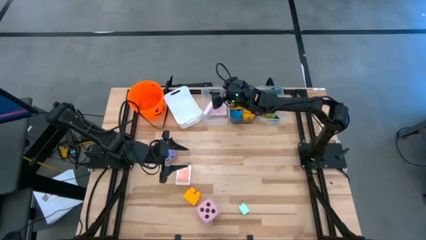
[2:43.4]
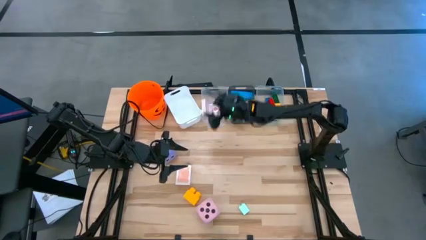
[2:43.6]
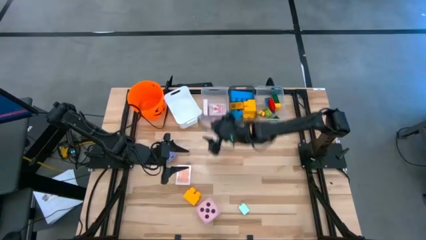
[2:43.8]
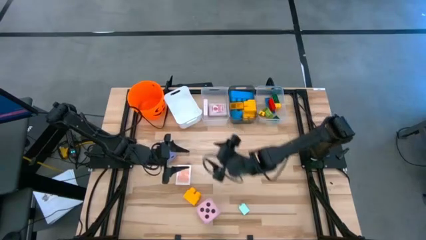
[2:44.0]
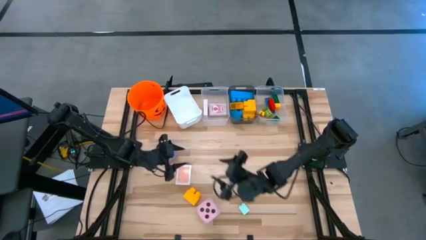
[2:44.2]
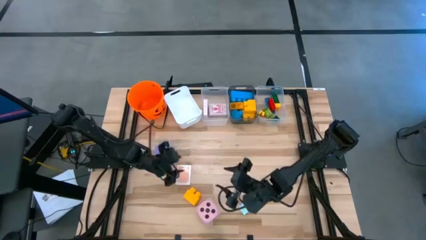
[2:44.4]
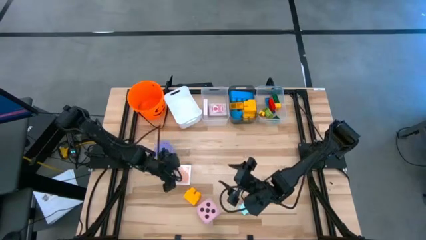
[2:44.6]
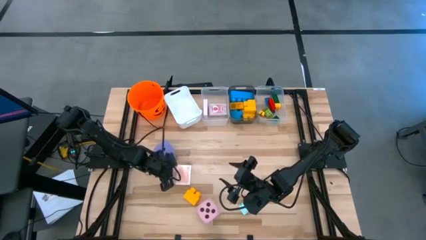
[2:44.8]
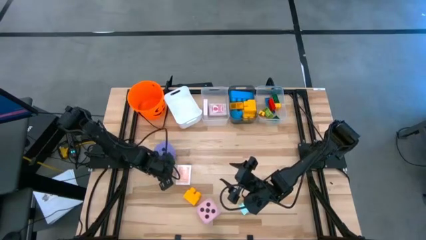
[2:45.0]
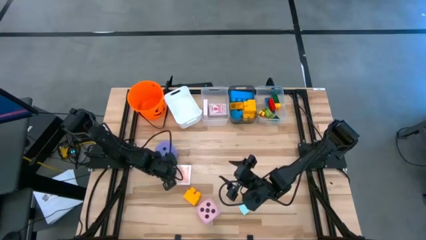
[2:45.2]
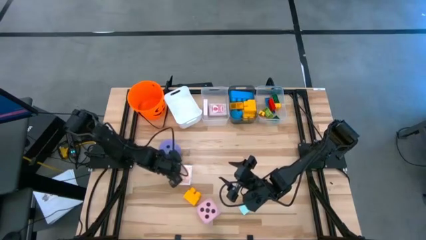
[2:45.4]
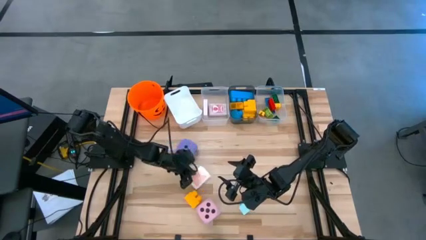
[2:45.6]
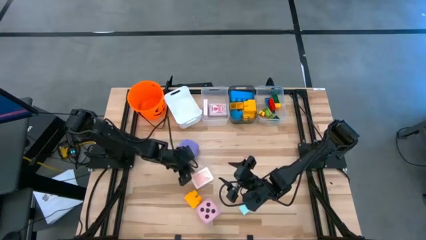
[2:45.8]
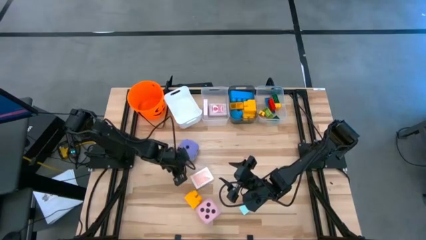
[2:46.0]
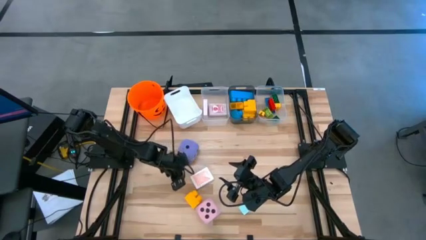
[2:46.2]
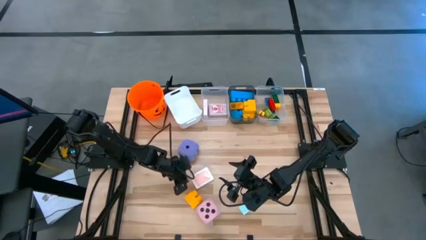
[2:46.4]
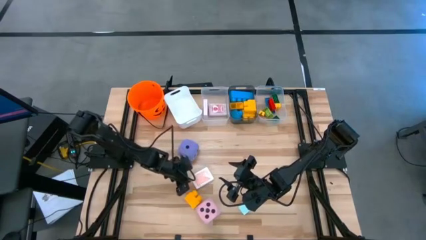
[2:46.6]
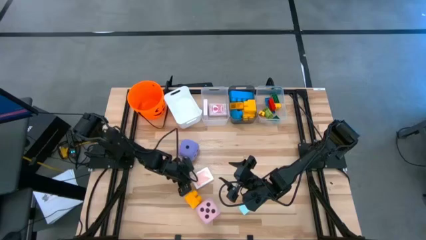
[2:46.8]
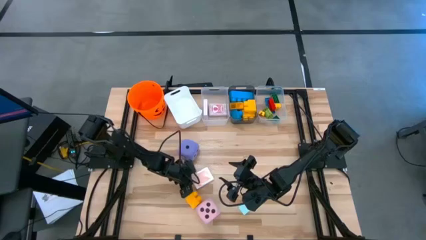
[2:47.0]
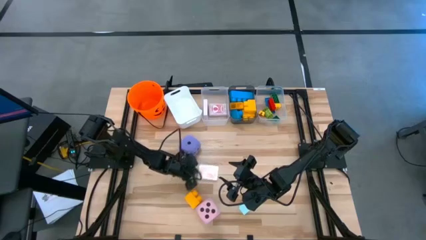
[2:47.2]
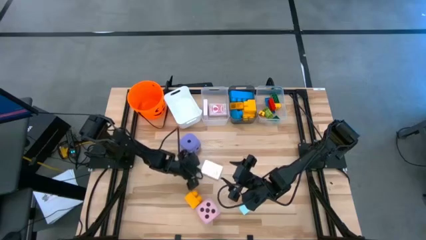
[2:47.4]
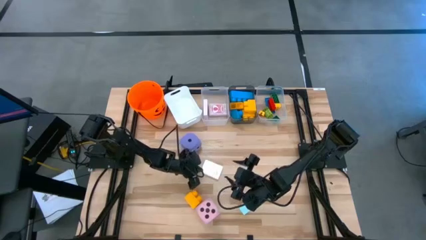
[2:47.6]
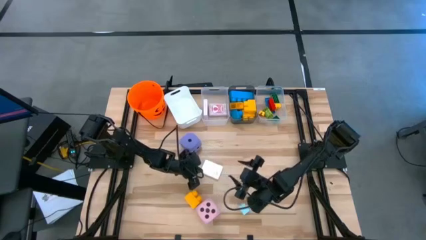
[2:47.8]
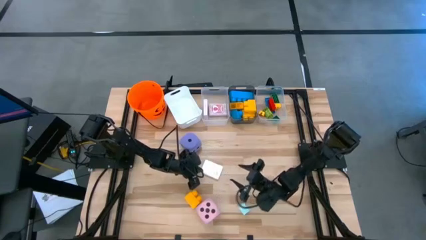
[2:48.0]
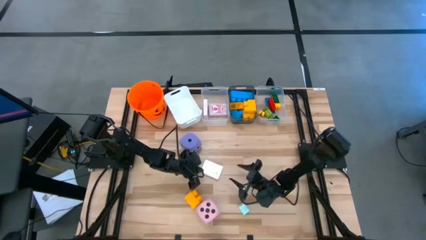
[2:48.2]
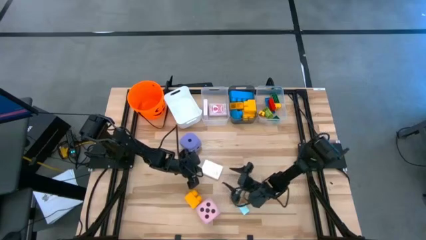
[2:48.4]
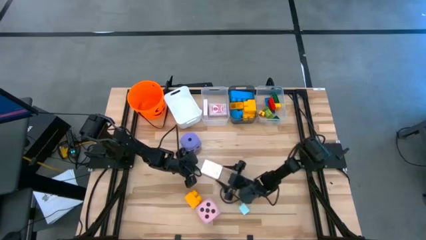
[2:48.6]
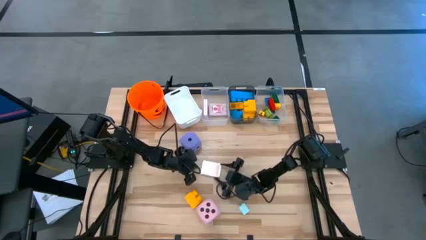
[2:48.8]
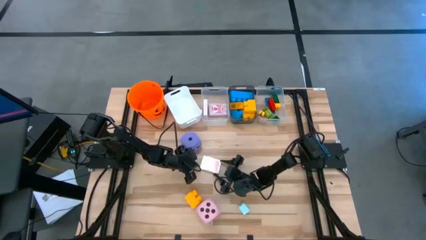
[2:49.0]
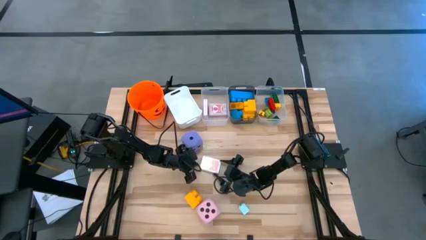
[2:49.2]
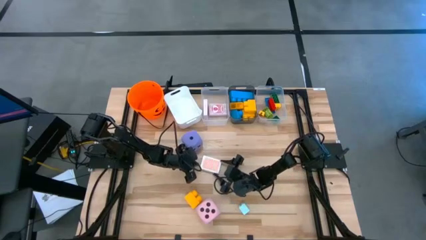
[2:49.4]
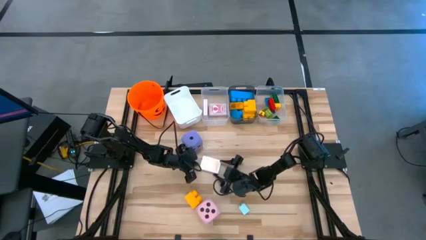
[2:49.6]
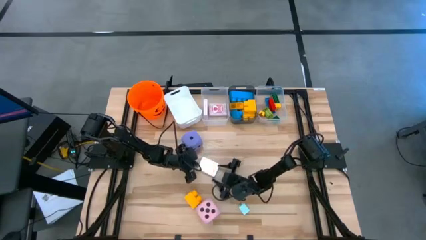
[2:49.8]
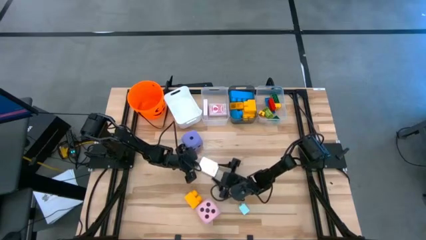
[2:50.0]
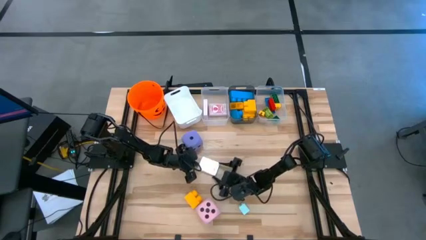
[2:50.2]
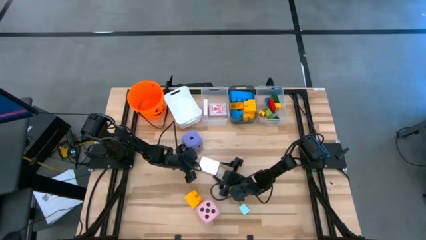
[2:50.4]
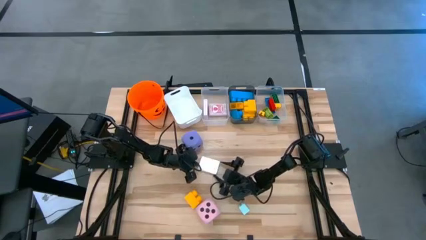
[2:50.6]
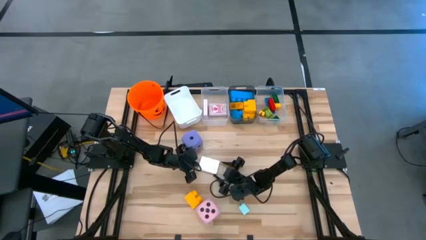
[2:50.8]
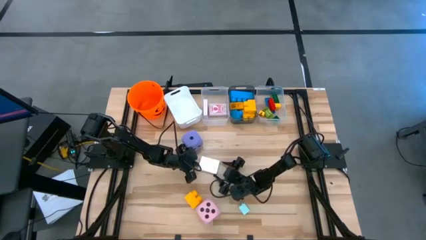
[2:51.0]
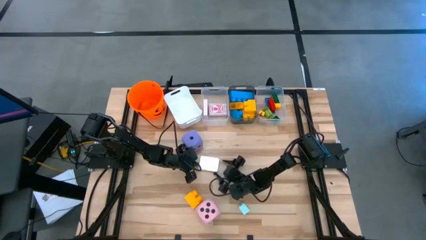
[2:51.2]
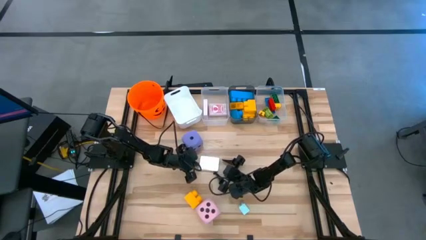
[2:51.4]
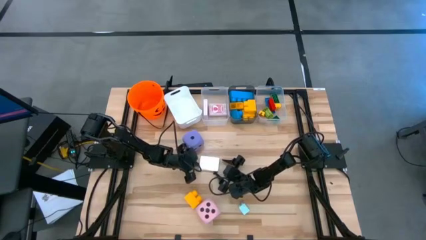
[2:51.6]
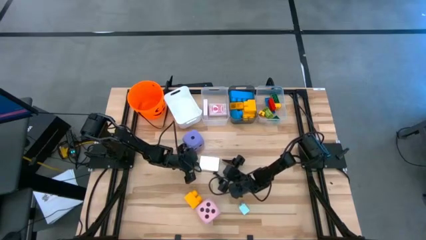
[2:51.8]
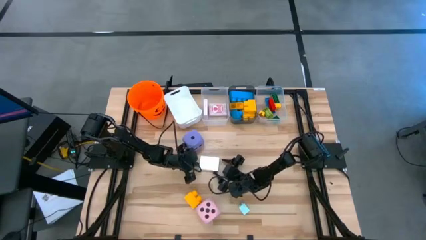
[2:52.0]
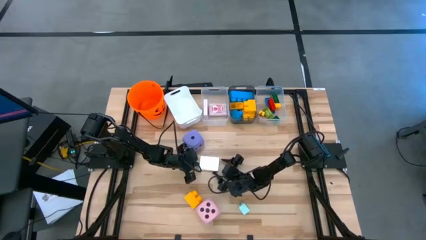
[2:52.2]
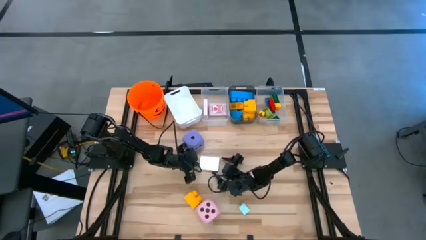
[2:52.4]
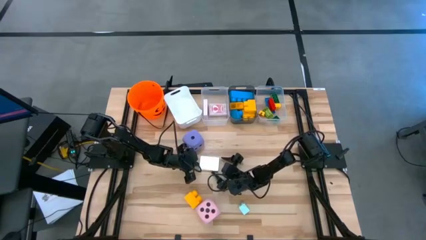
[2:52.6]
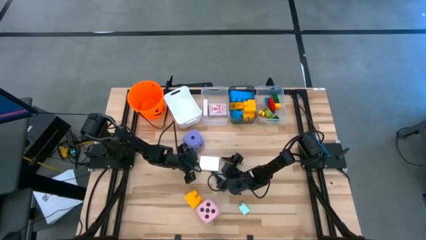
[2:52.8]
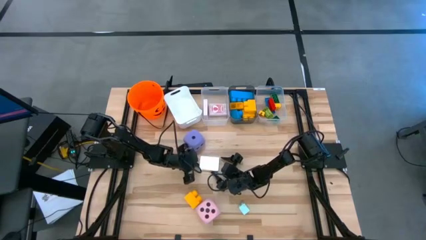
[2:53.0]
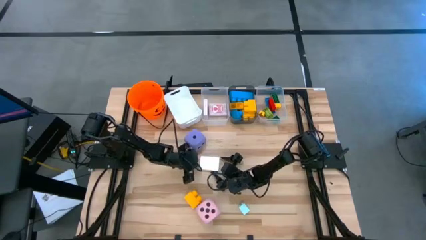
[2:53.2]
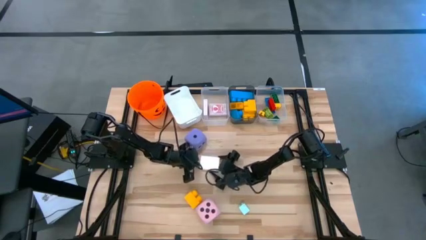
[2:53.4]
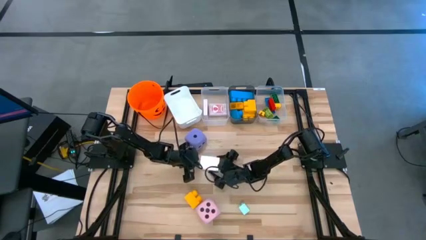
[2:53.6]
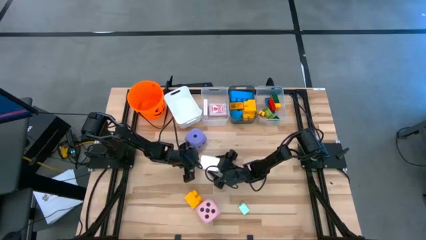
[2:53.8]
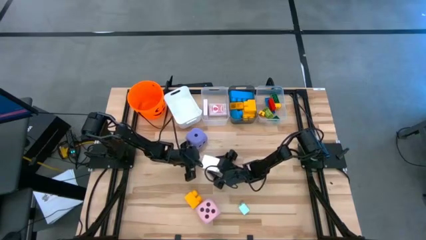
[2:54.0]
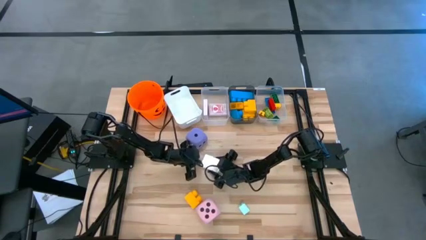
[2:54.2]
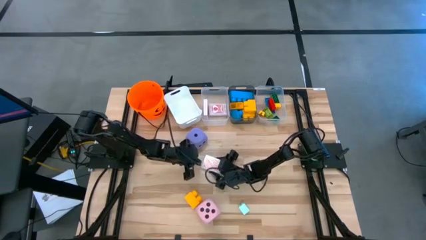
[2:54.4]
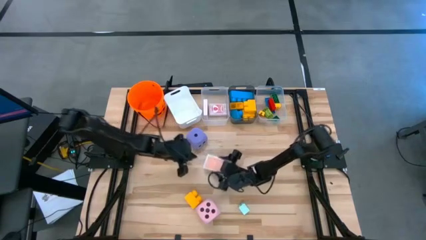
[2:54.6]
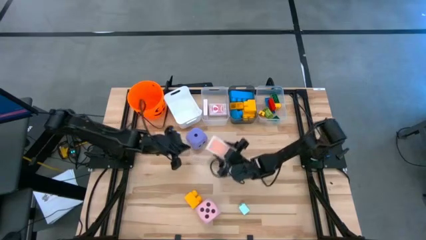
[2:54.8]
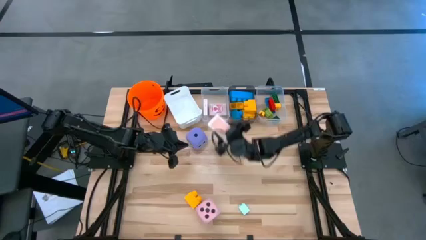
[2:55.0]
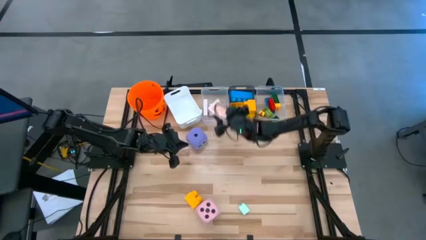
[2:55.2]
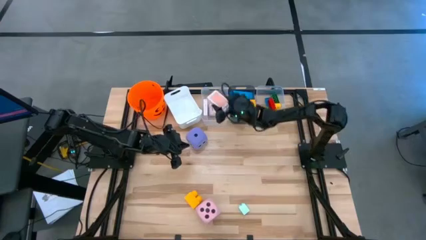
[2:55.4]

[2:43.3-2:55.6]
Task: Pick & Place Toys
Put the orange deck of cards into the left transparent bin

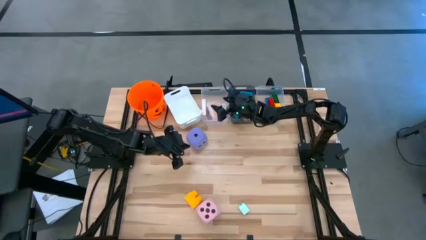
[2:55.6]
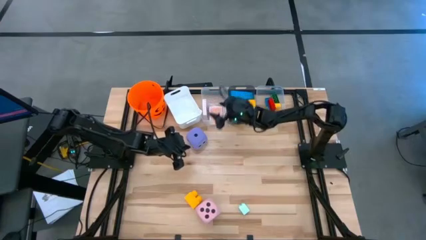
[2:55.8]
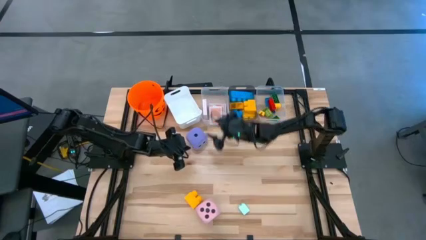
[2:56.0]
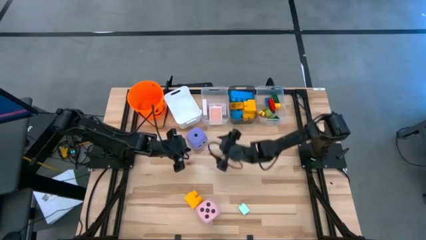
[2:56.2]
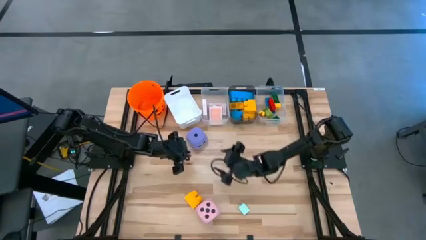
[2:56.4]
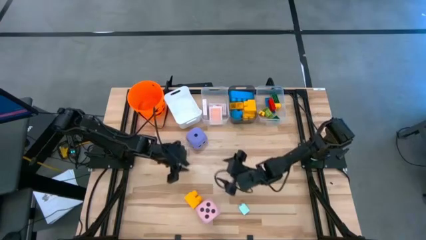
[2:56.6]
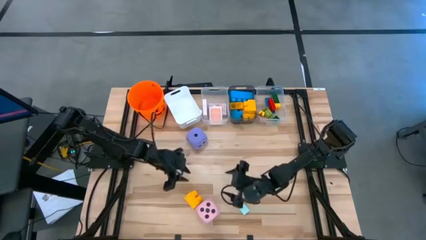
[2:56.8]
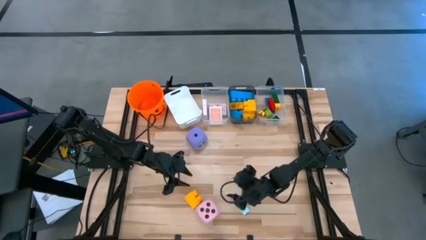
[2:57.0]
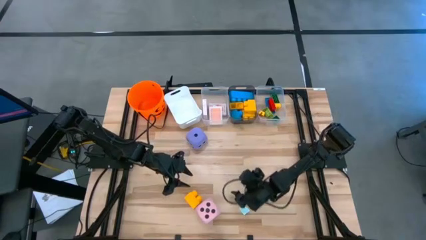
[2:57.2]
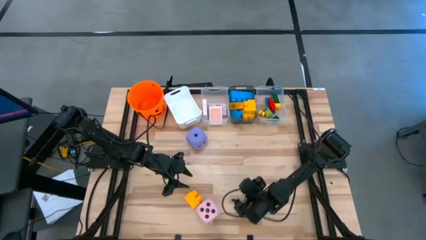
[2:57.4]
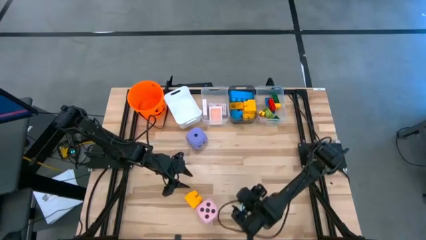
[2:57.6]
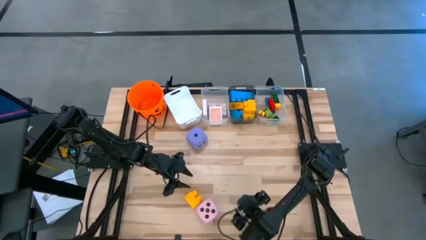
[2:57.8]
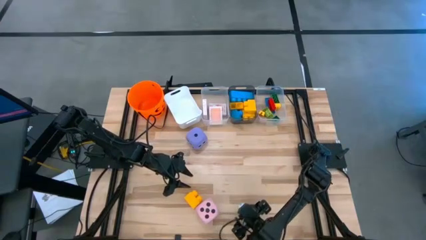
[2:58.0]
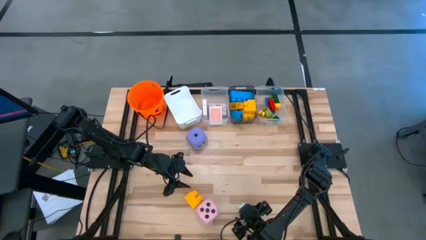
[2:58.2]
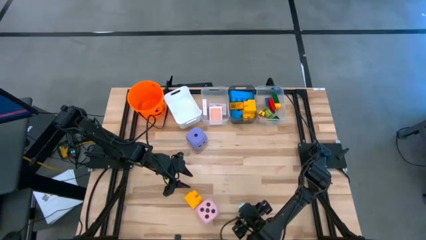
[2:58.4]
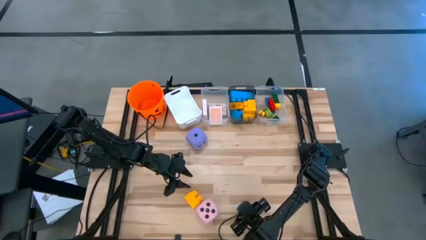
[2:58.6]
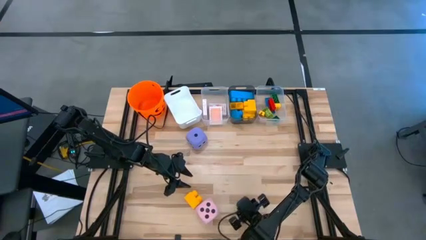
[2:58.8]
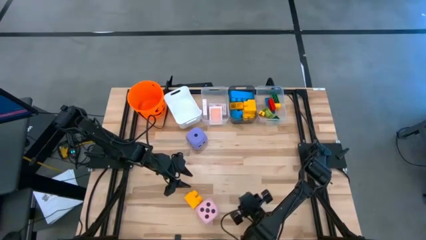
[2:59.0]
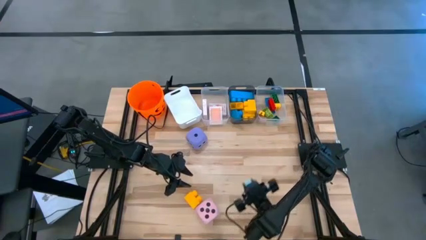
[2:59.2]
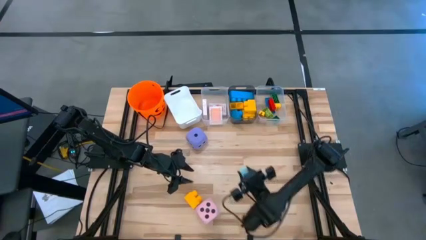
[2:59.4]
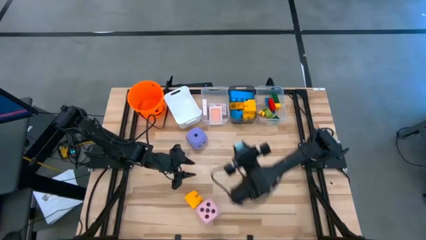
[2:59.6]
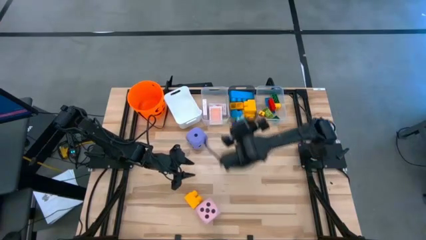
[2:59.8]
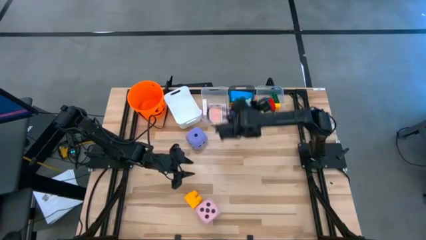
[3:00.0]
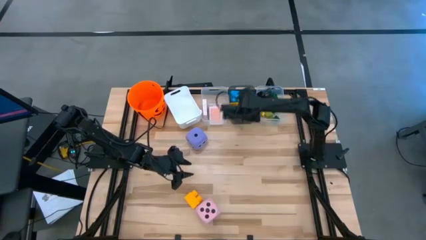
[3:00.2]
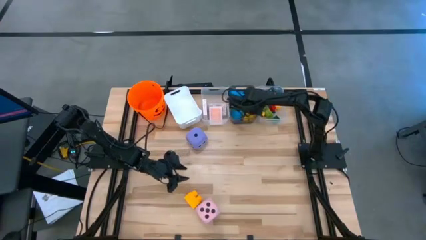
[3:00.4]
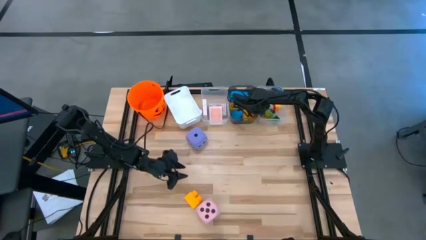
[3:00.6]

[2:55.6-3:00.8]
Put the small light blue game piece into the right transparent bin
